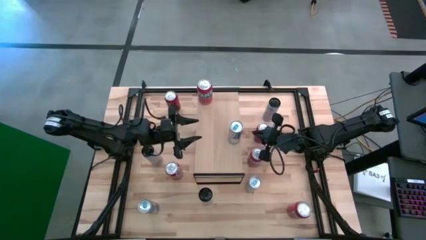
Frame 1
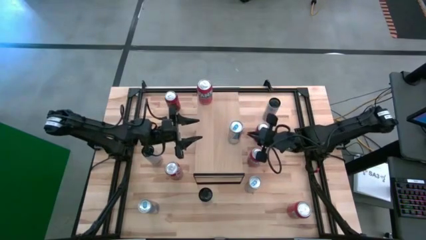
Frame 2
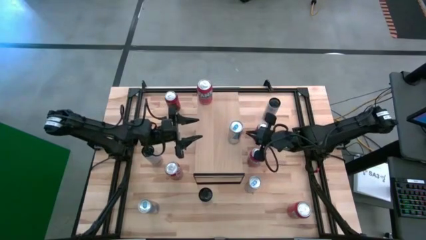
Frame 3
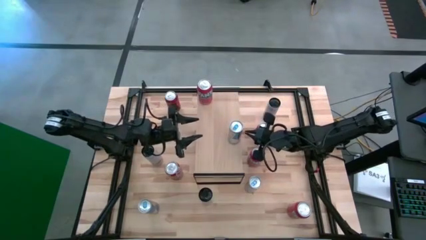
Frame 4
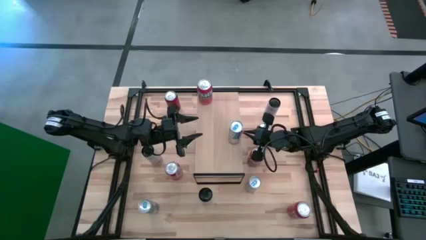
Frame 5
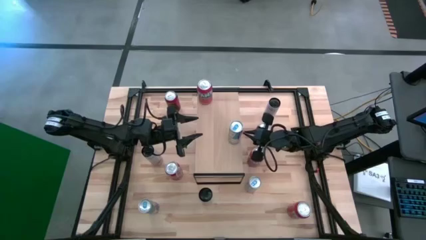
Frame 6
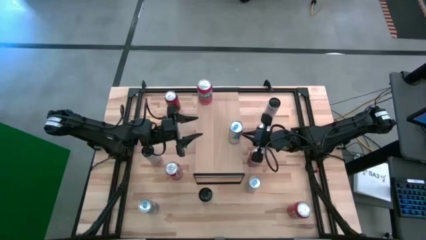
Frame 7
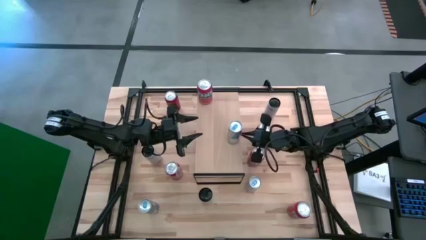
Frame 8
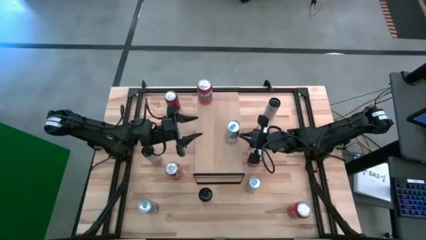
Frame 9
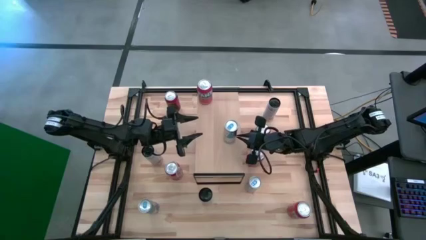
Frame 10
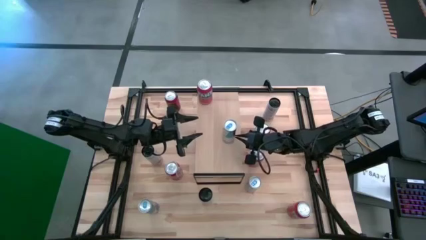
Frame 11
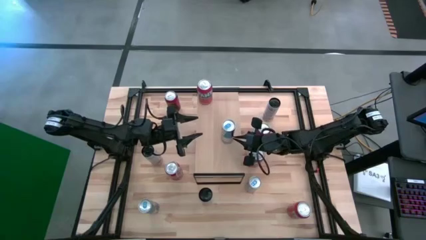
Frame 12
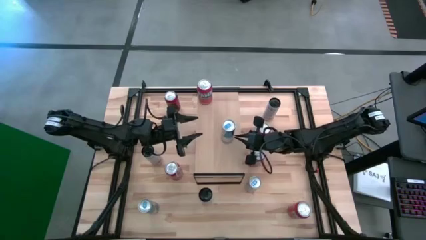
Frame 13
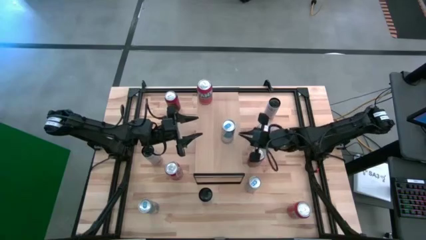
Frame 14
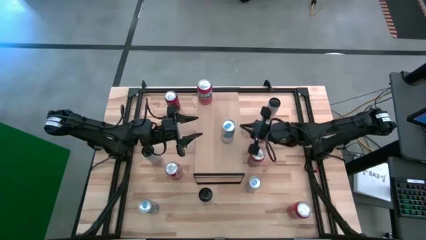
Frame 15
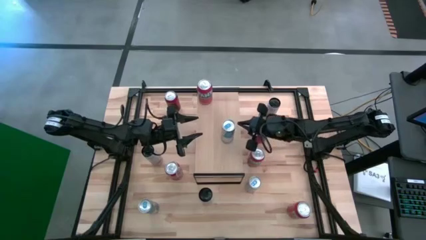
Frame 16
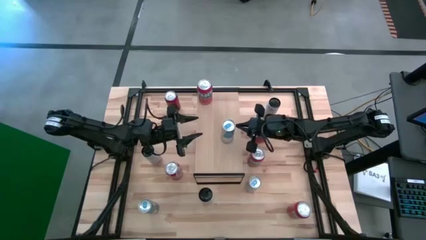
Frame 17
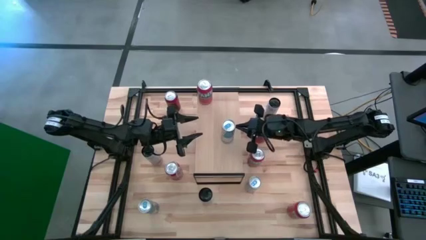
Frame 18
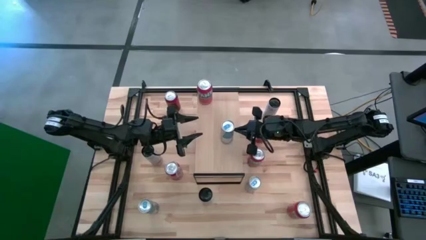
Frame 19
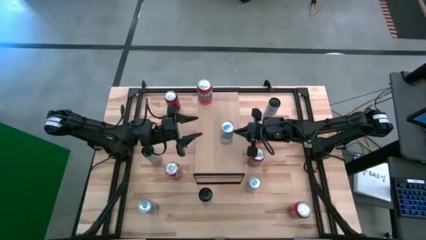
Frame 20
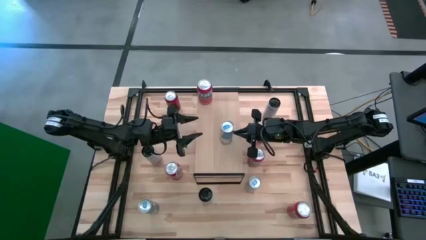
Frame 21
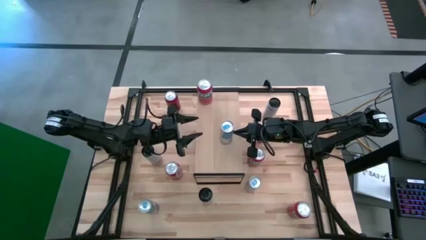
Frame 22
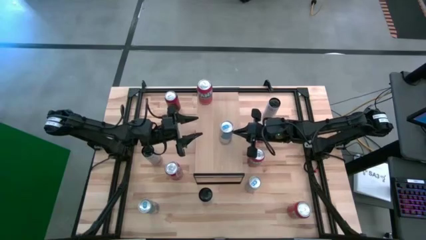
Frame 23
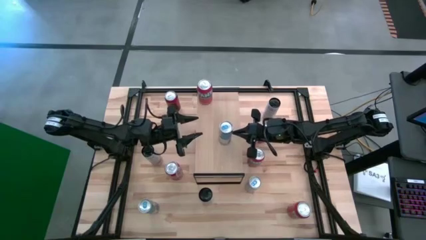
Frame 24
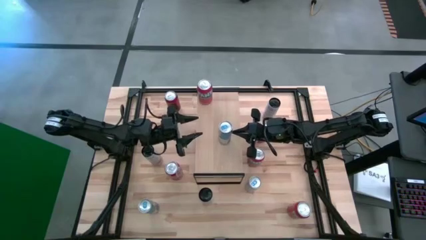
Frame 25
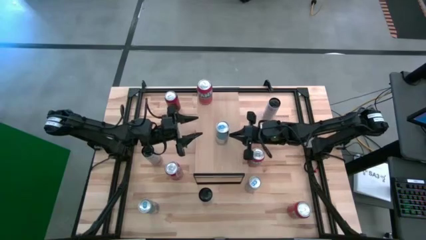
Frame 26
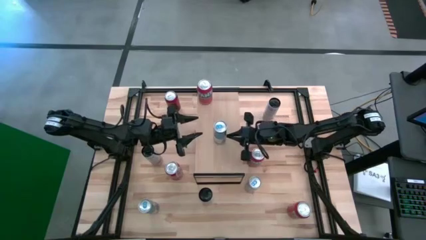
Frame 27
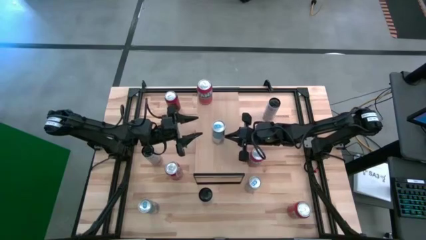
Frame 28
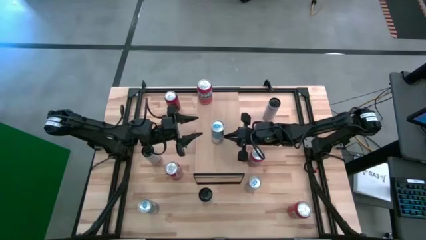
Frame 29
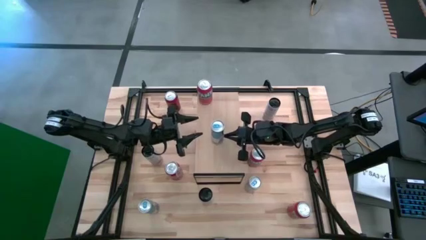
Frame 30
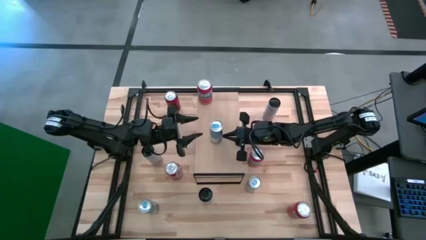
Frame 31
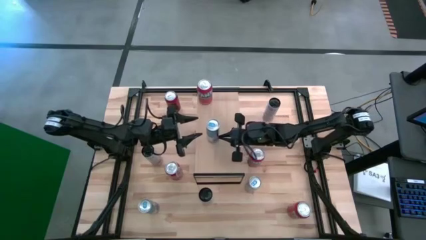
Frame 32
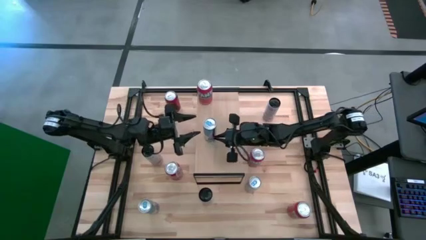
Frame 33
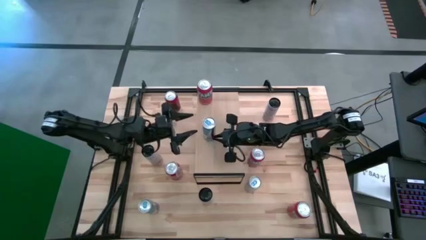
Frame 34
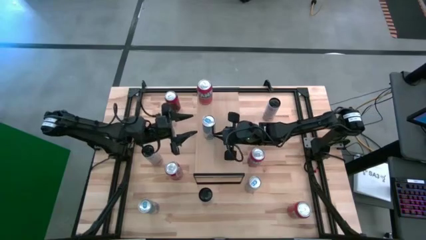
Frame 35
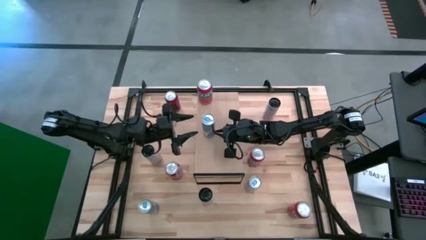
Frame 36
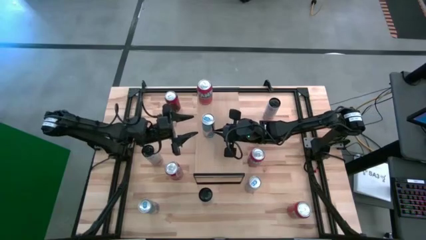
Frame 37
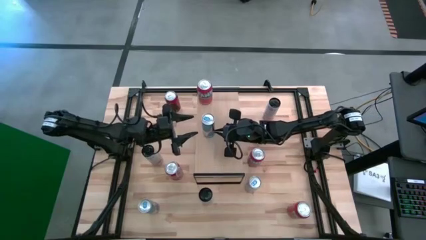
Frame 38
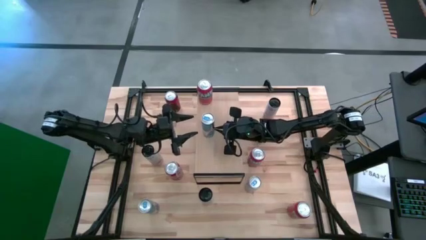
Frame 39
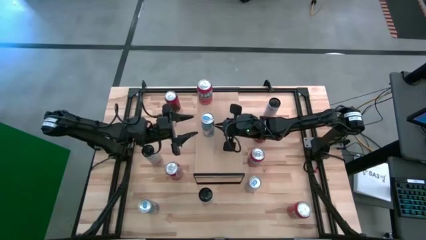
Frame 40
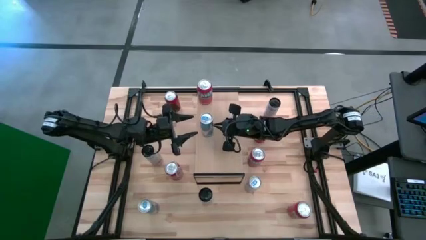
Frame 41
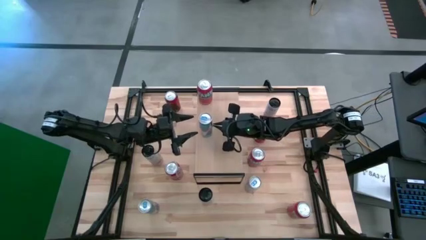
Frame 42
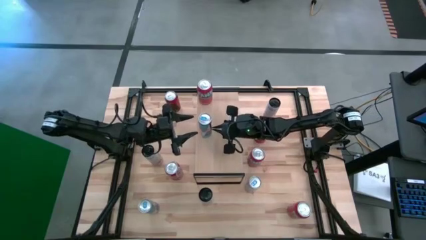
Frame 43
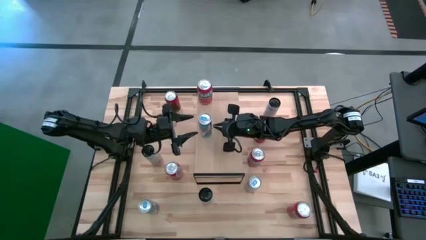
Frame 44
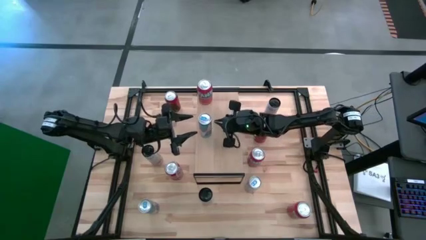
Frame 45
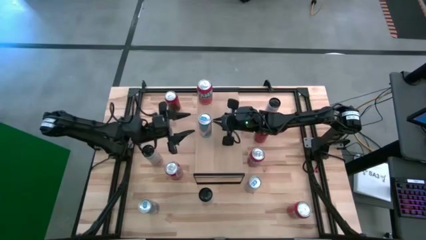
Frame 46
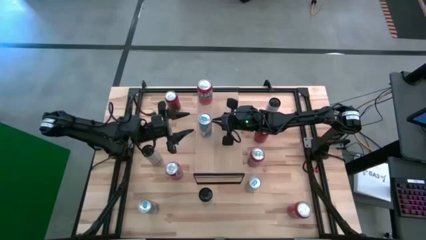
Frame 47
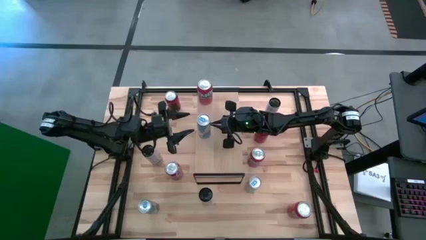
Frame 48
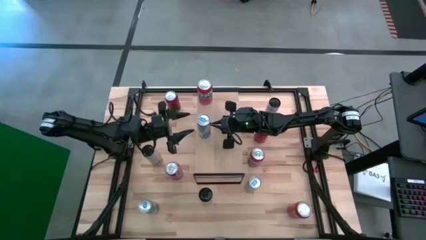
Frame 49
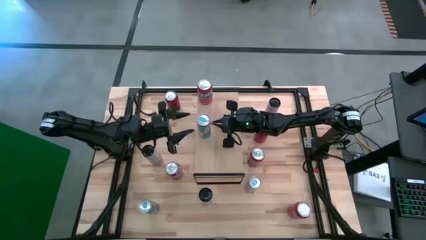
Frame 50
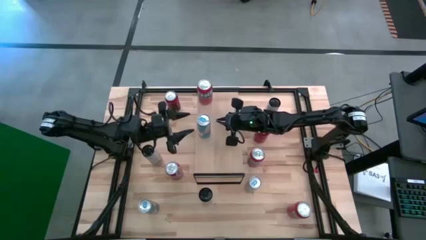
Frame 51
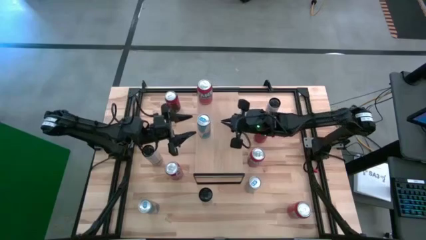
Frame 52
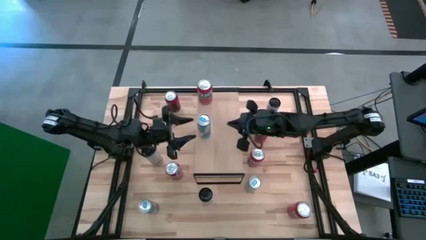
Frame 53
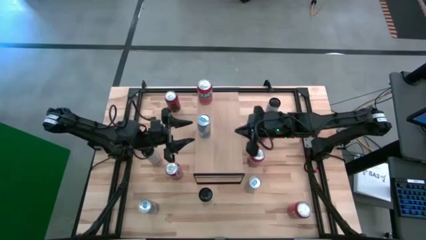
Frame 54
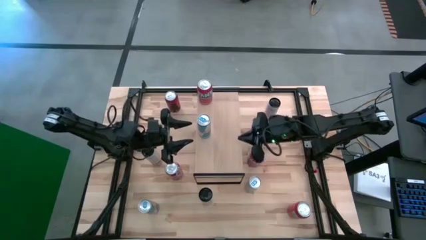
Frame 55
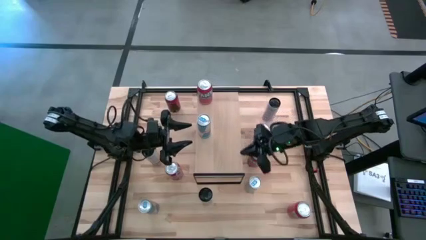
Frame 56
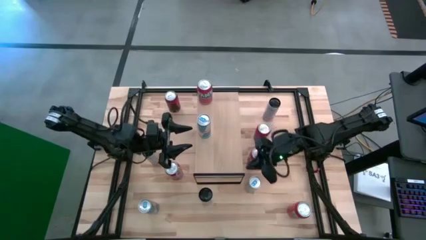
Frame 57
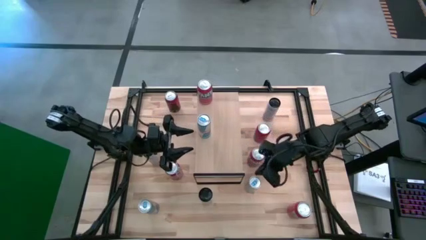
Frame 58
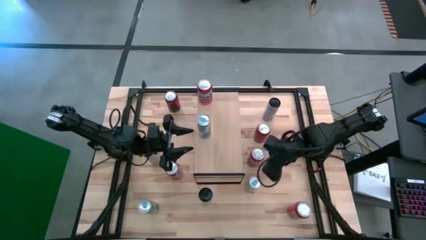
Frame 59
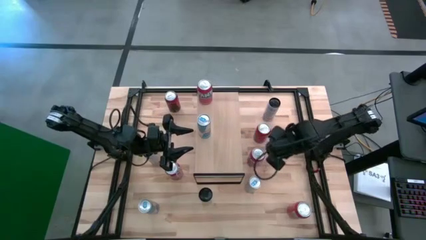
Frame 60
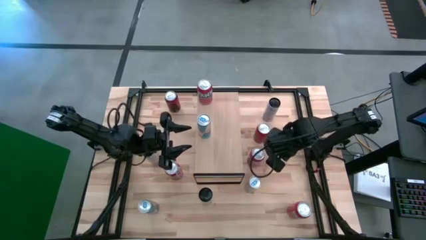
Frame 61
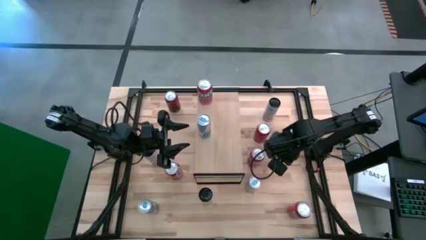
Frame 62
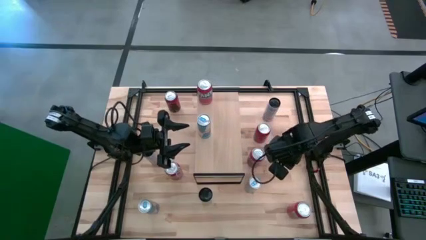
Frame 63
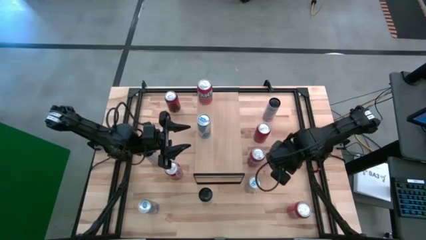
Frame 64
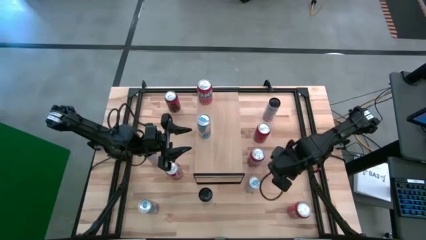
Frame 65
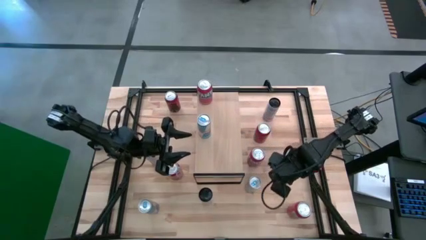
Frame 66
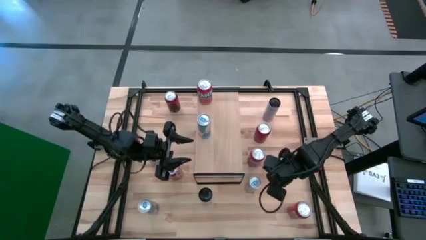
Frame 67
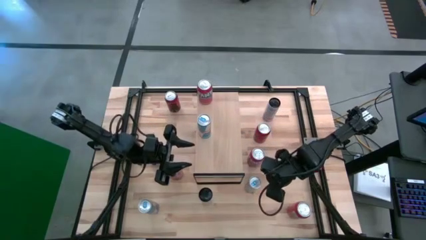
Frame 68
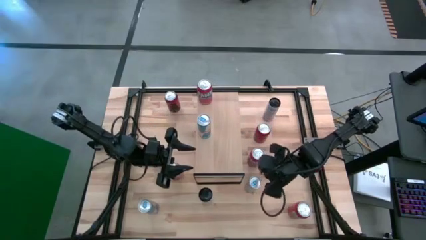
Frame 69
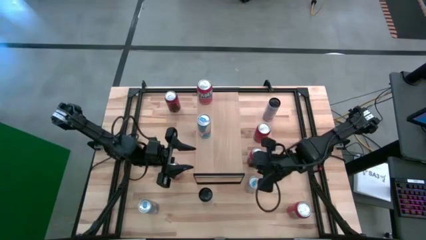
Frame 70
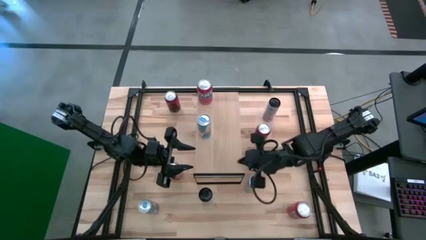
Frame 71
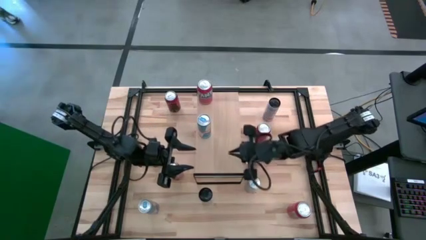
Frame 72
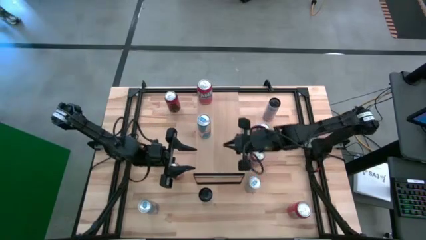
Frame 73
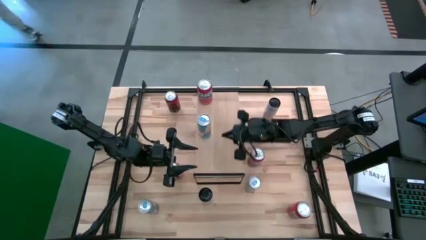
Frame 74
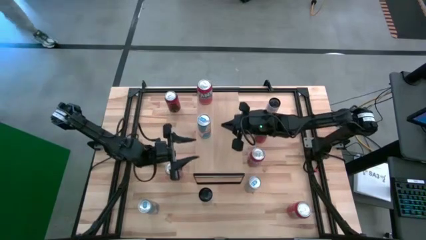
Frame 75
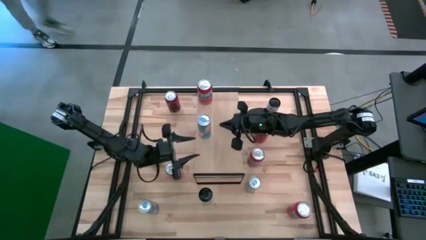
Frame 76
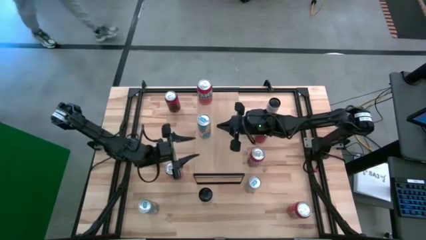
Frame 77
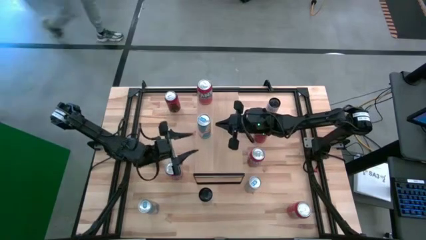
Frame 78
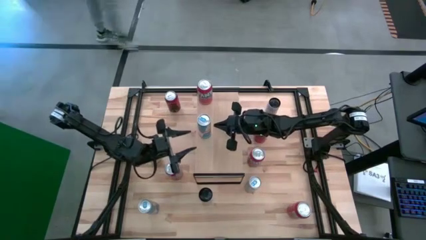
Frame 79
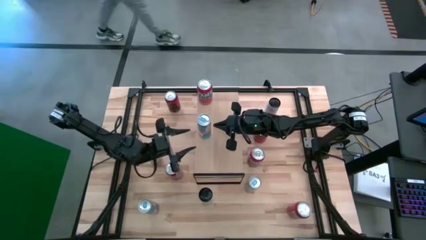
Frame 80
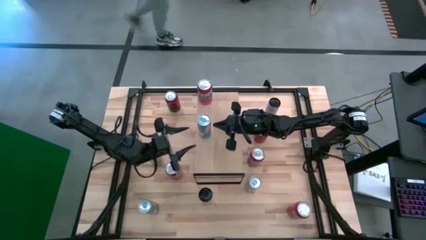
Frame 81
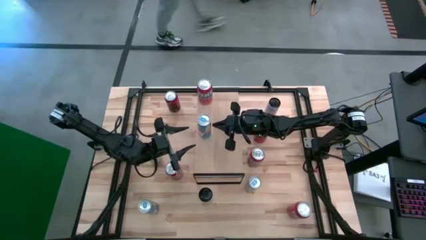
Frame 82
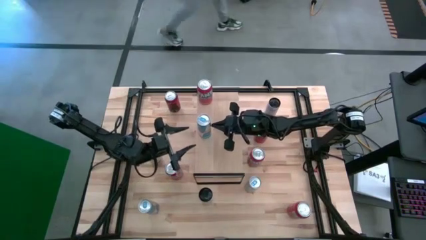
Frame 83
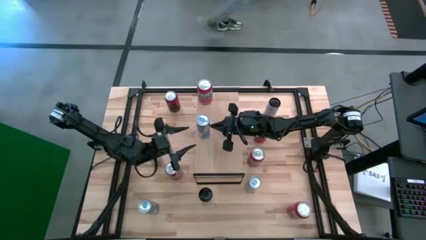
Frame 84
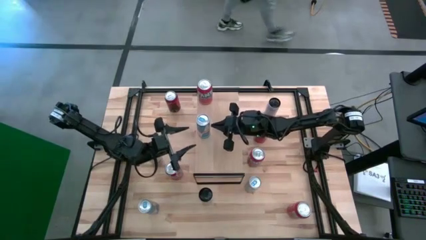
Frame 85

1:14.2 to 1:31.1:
Task: Place canned beverage on shelf
Put the bottom right blue soda can on the shelf
